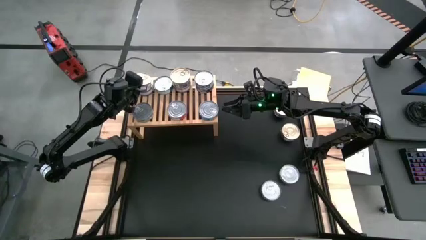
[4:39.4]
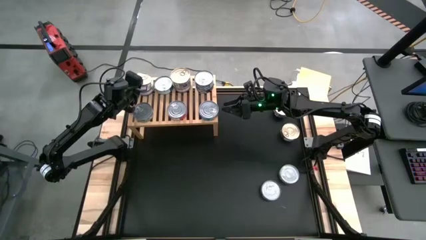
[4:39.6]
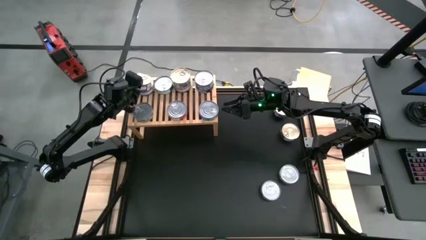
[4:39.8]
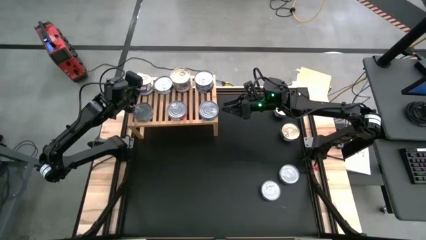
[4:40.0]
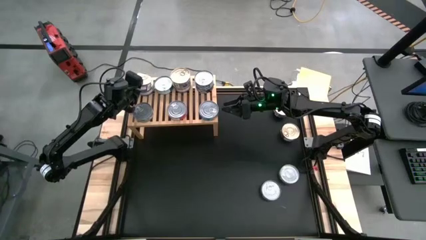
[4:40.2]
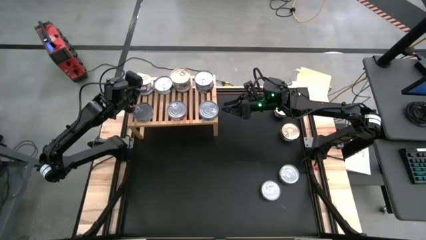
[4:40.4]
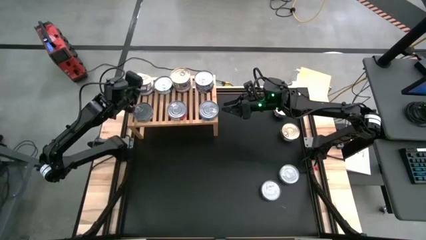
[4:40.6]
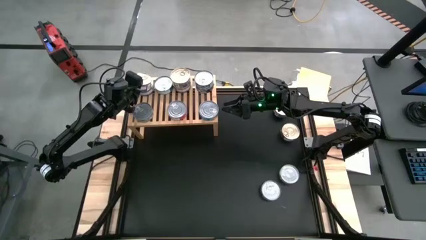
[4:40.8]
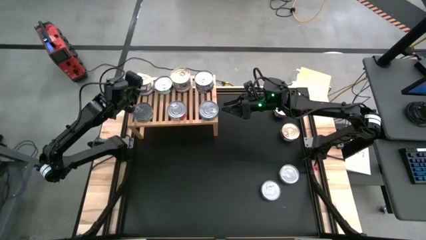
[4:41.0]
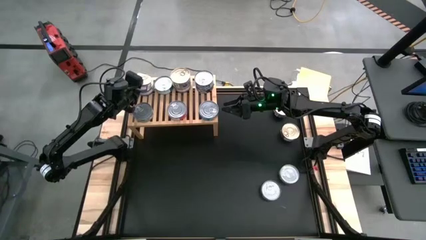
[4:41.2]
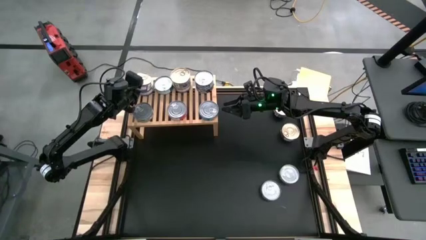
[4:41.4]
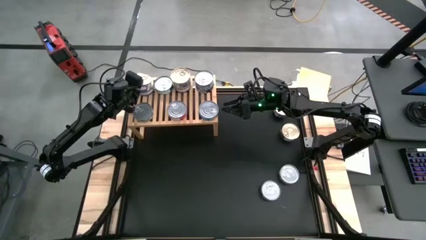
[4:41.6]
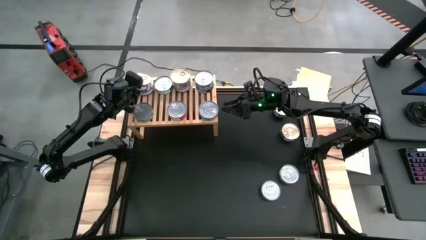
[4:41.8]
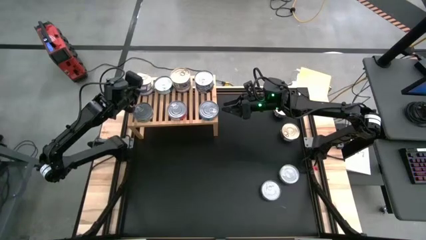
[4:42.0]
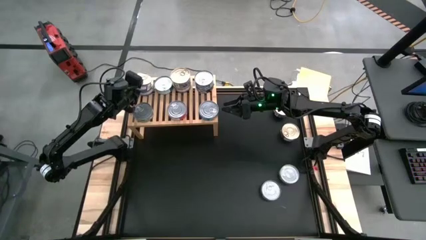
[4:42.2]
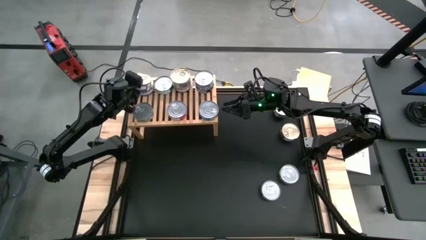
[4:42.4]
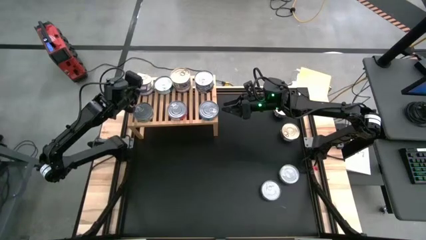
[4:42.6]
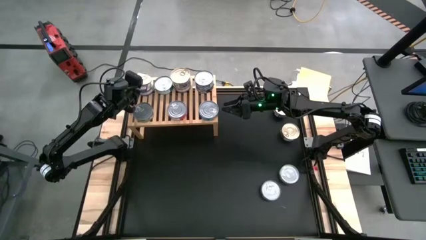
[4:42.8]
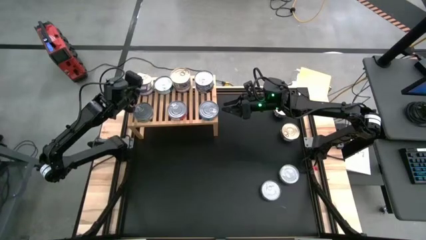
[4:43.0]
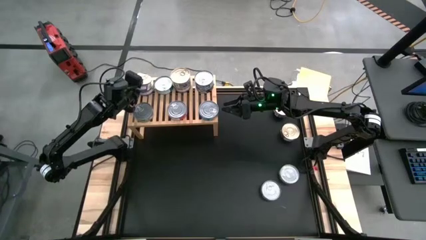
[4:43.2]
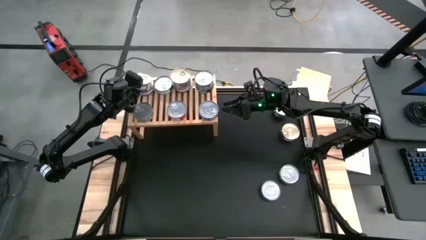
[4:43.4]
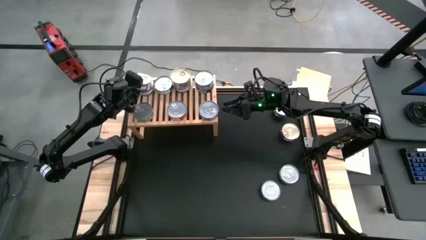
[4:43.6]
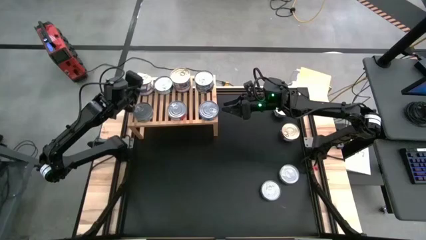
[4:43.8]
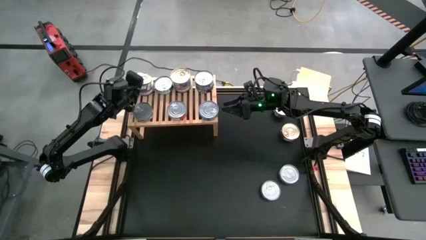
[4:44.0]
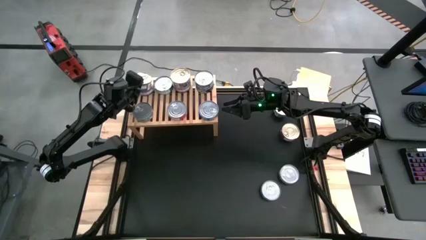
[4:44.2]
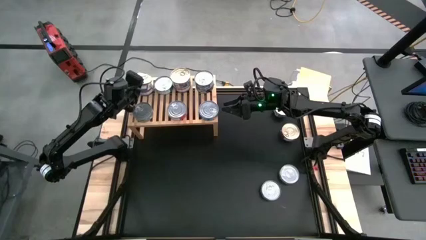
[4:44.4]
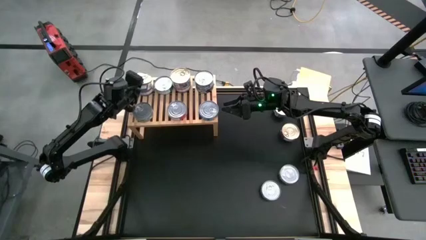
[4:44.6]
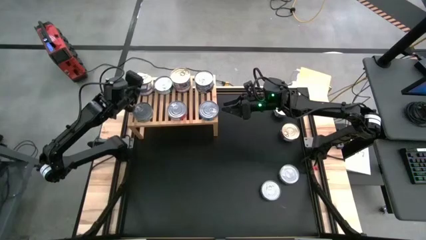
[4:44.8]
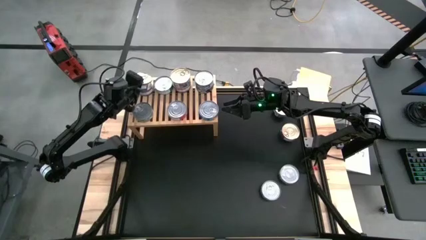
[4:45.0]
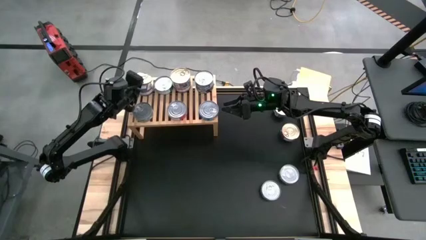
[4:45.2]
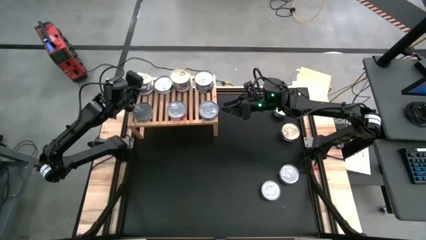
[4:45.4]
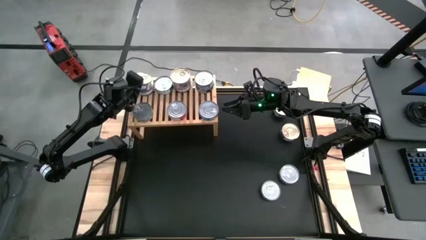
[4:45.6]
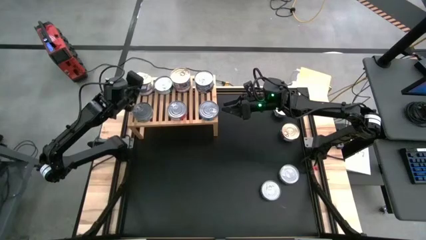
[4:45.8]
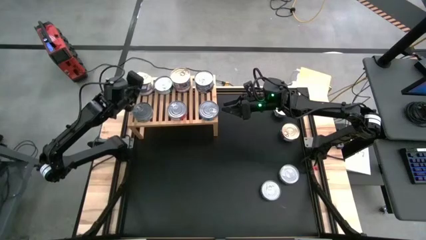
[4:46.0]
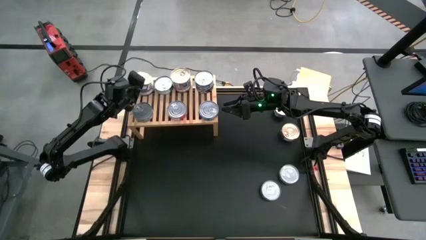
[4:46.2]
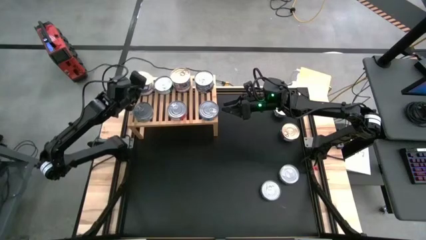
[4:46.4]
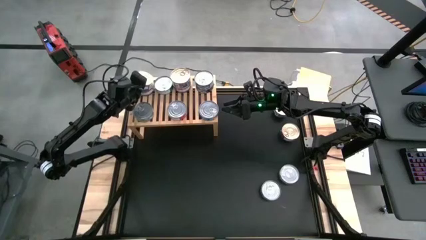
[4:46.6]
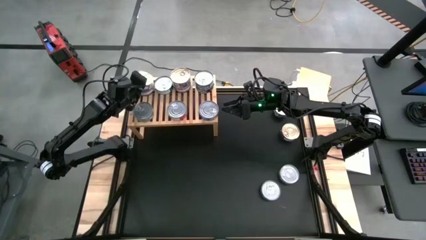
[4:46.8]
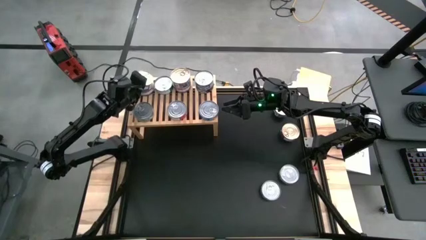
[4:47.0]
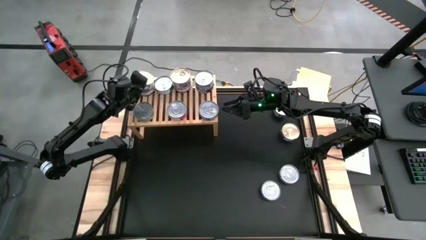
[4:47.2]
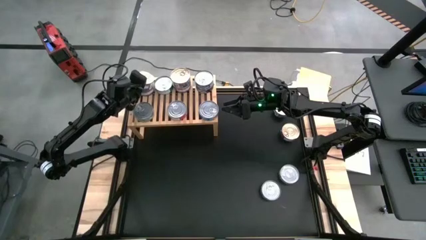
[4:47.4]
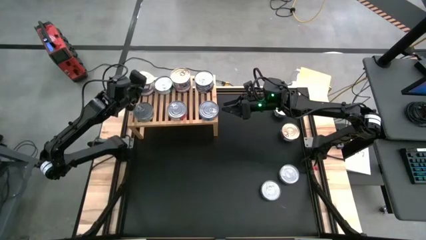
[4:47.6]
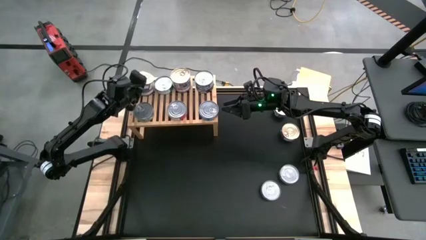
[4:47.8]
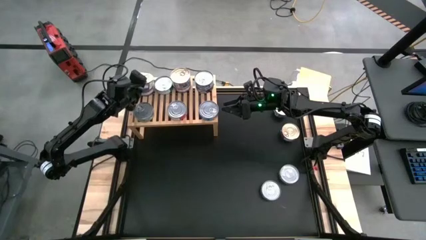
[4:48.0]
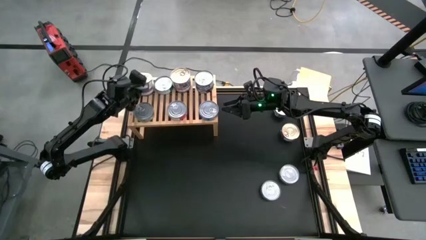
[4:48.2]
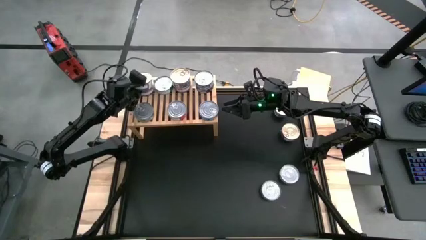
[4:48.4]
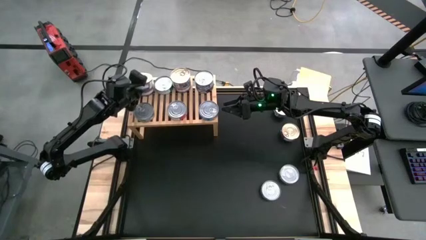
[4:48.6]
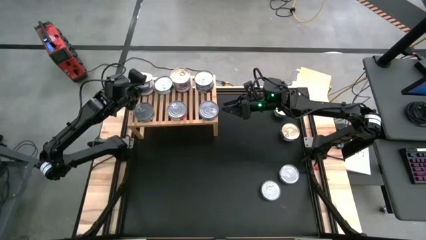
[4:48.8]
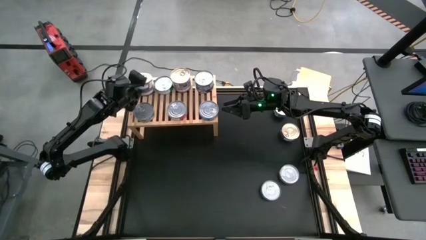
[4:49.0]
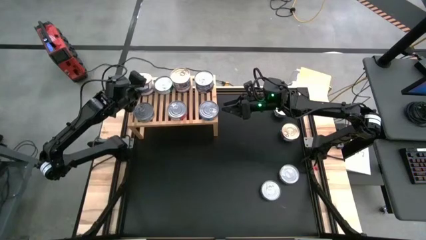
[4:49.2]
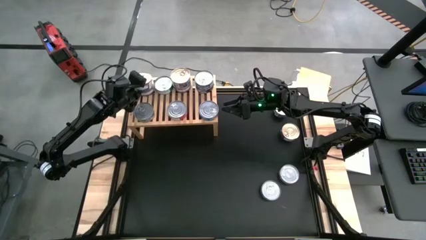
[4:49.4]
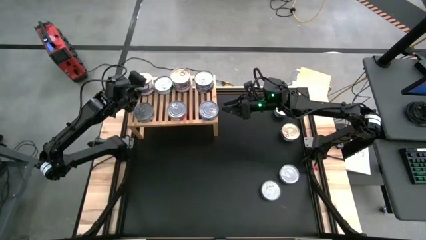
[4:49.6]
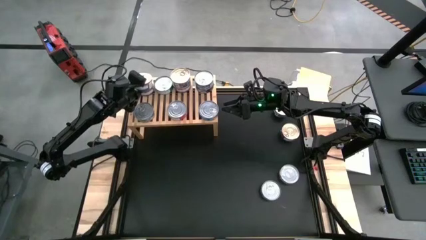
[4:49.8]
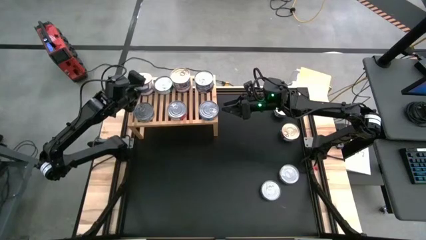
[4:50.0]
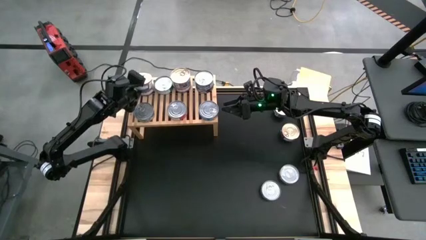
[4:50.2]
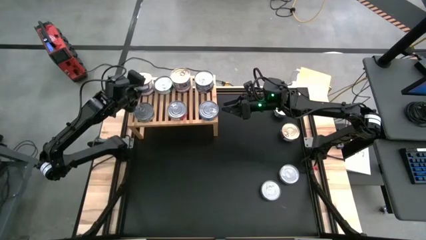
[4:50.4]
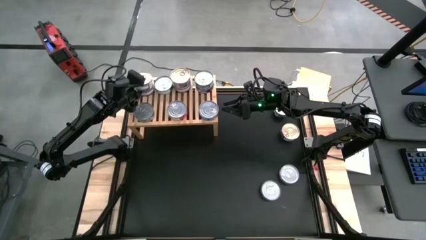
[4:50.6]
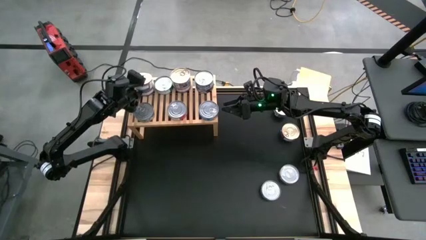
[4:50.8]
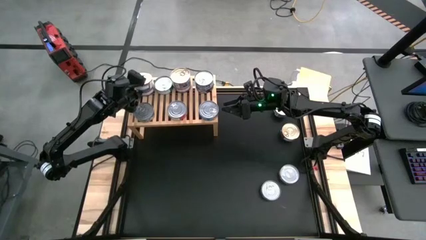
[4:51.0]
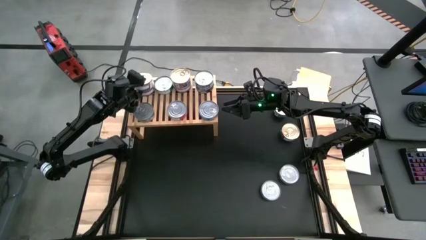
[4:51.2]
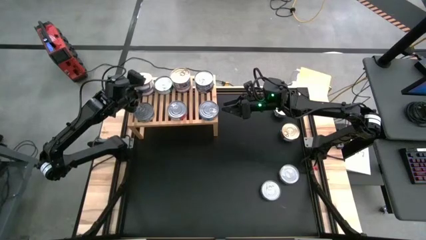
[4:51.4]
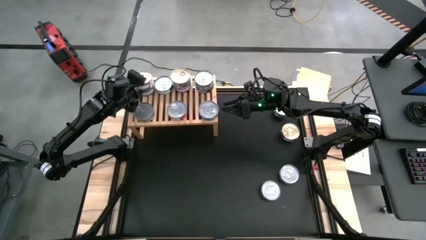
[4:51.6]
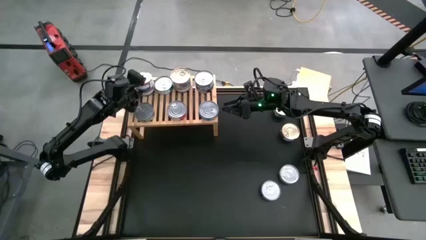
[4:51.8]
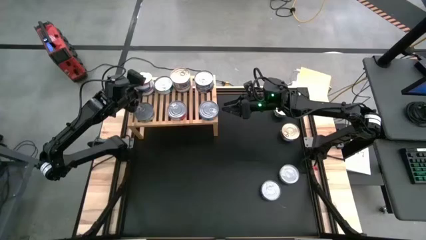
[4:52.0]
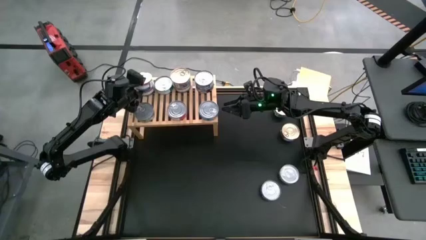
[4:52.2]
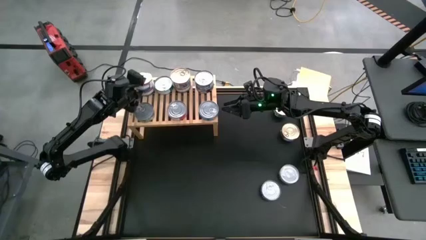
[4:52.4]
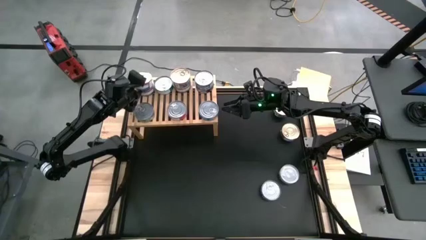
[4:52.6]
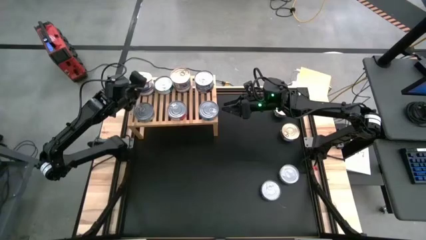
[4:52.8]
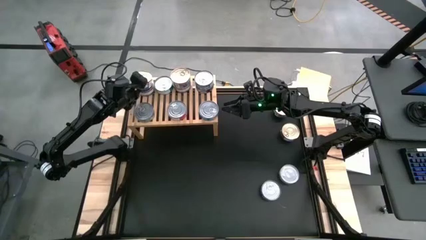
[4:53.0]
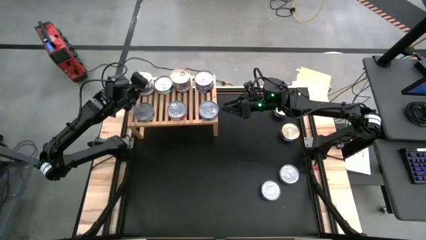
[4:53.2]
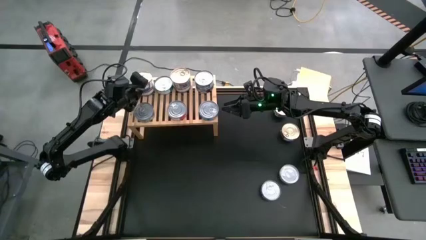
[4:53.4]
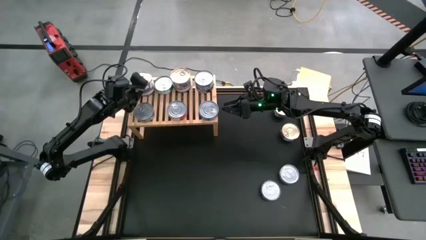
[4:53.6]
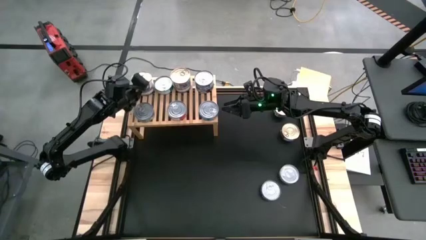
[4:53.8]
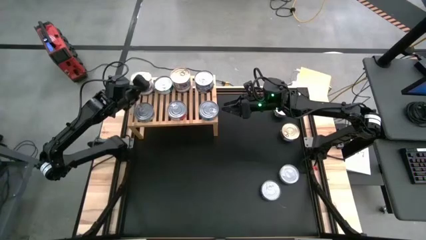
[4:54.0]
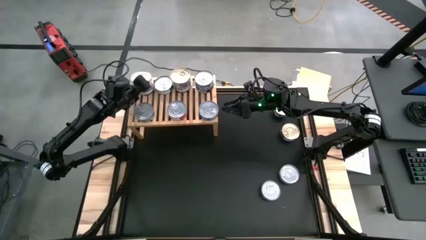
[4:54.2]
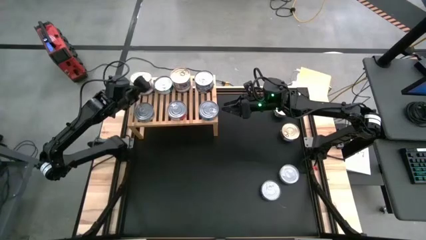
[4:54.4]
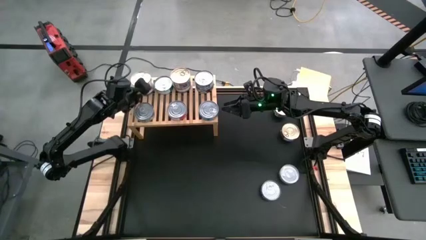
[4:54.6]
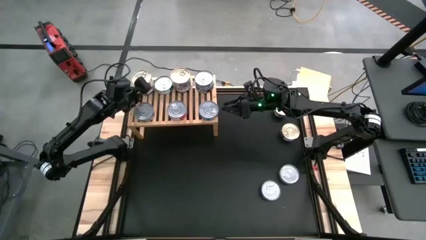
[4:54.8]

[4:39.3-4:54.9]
Task: Stack canned seafood by type on shelf
Stack the blue pink tuna can on top of the other blue pink tuna can on the shelf
